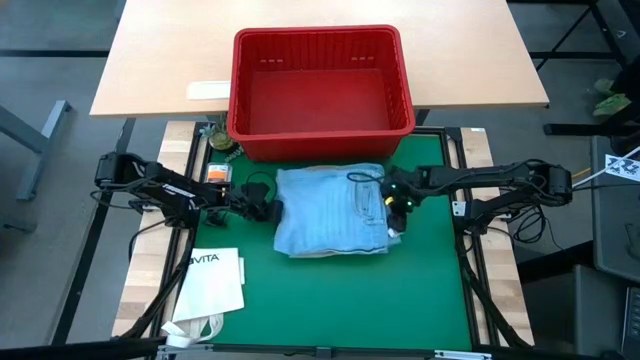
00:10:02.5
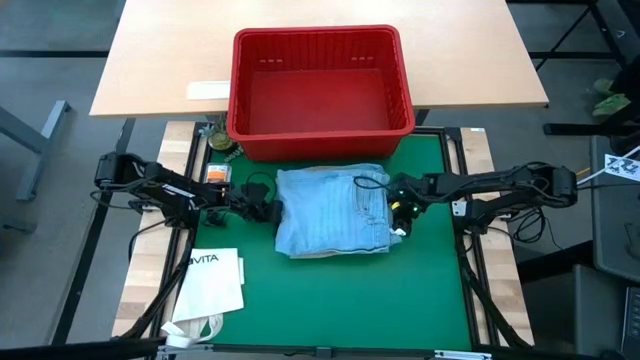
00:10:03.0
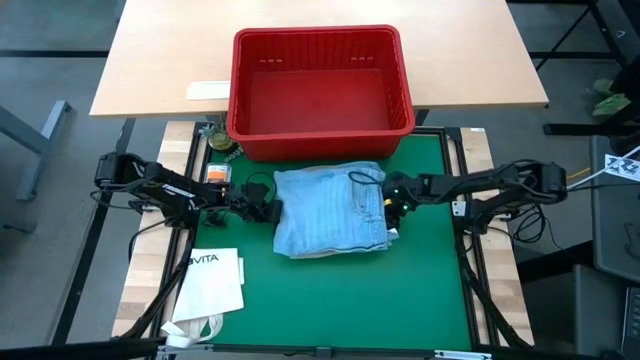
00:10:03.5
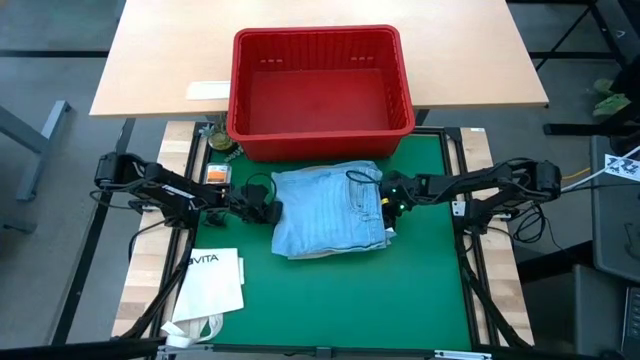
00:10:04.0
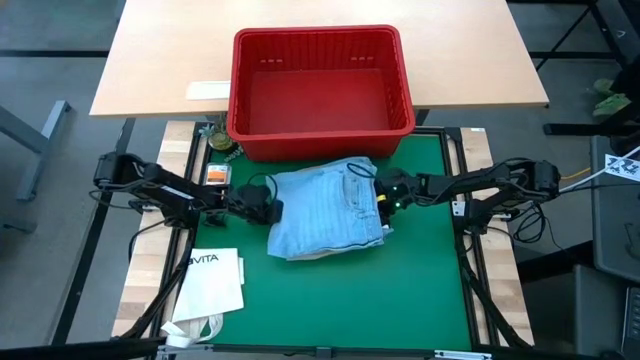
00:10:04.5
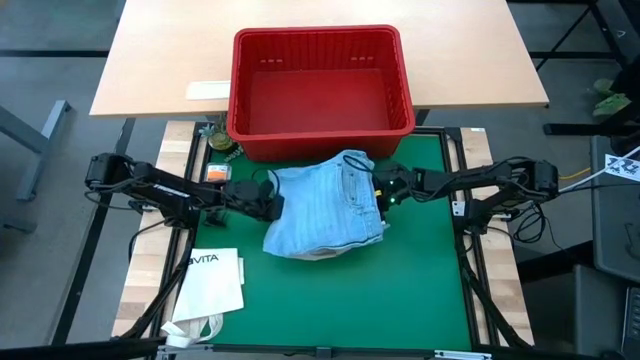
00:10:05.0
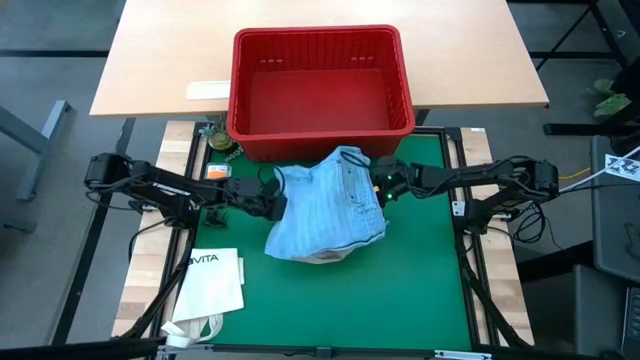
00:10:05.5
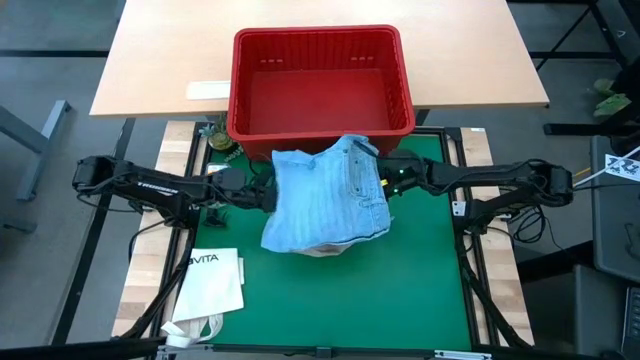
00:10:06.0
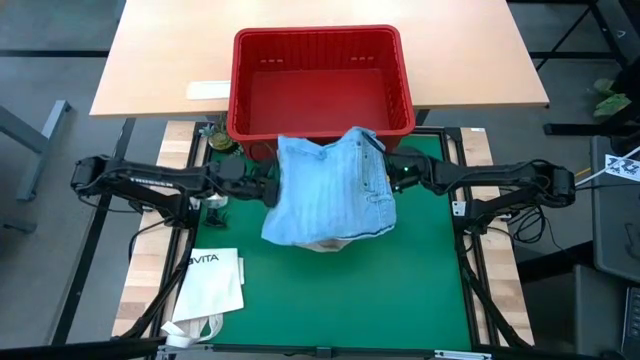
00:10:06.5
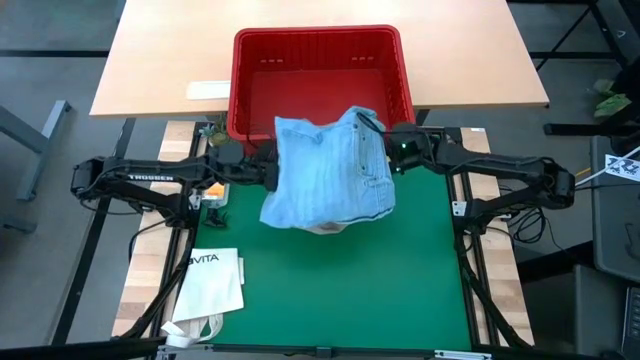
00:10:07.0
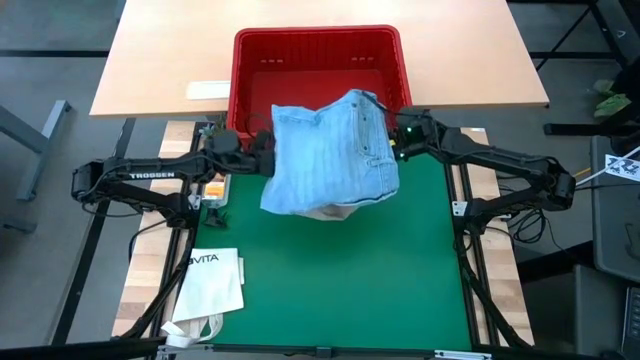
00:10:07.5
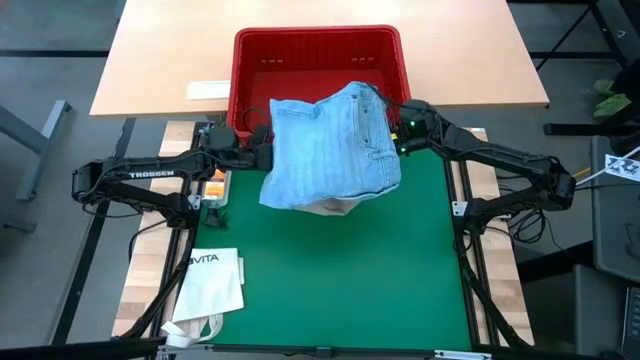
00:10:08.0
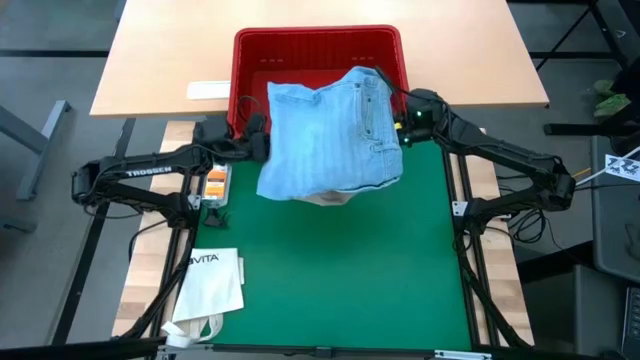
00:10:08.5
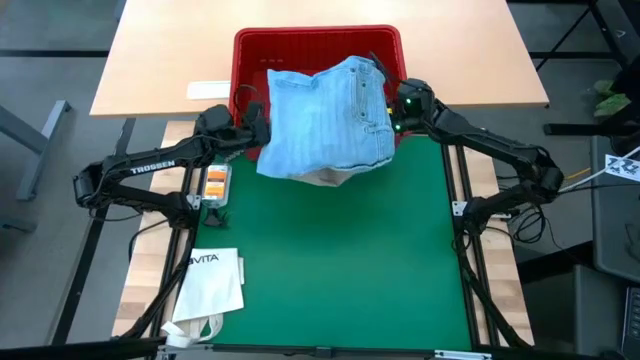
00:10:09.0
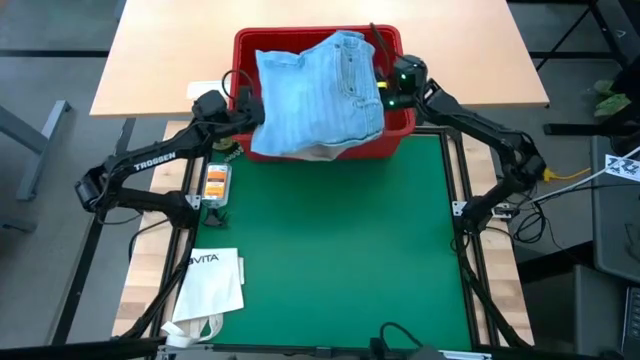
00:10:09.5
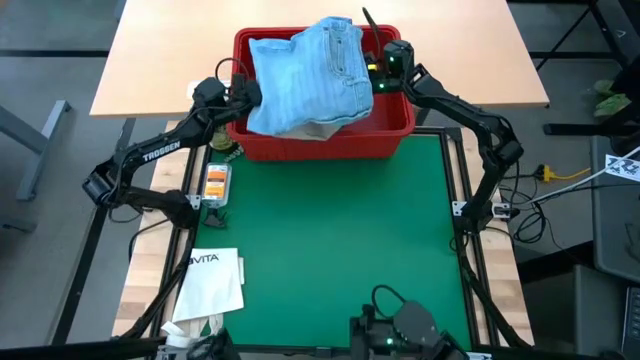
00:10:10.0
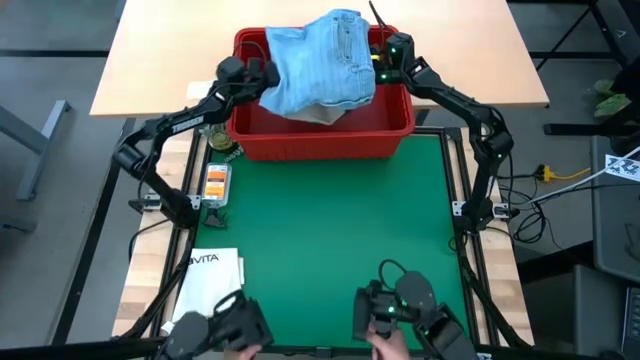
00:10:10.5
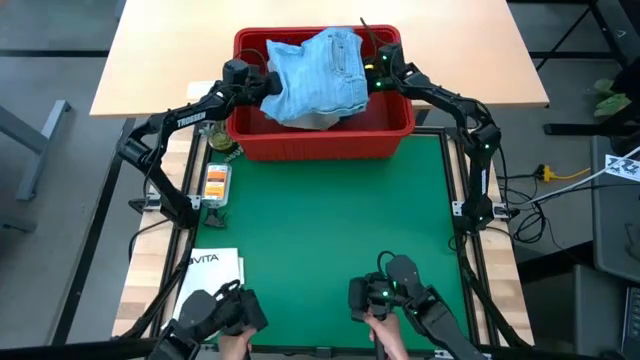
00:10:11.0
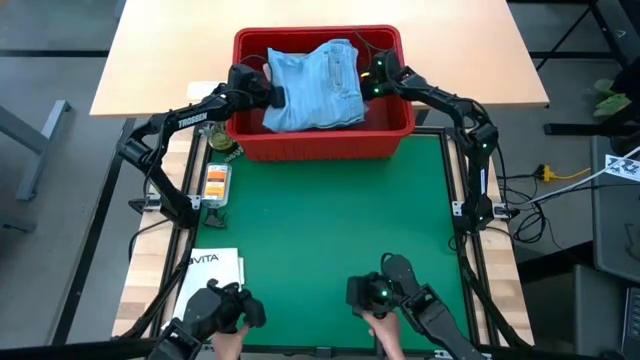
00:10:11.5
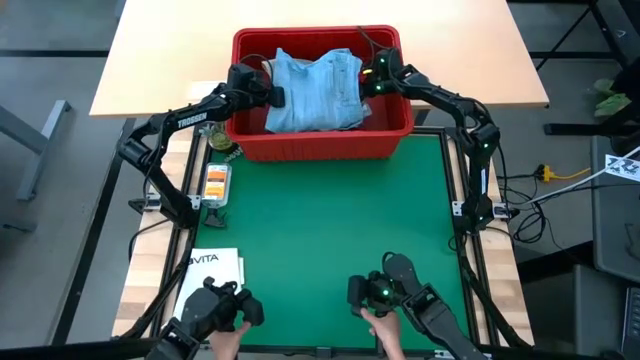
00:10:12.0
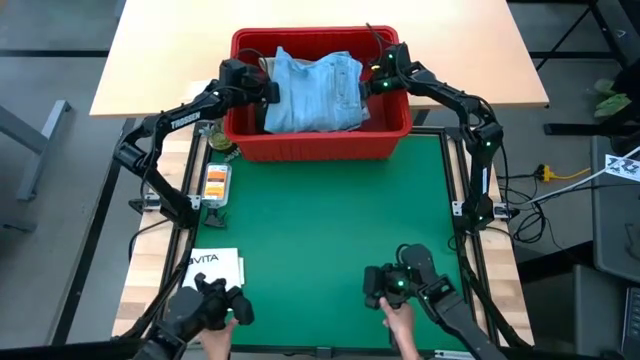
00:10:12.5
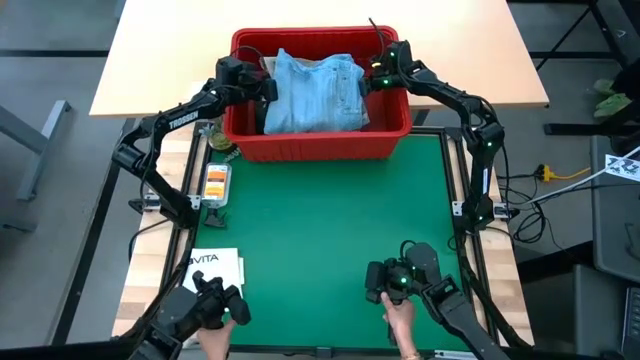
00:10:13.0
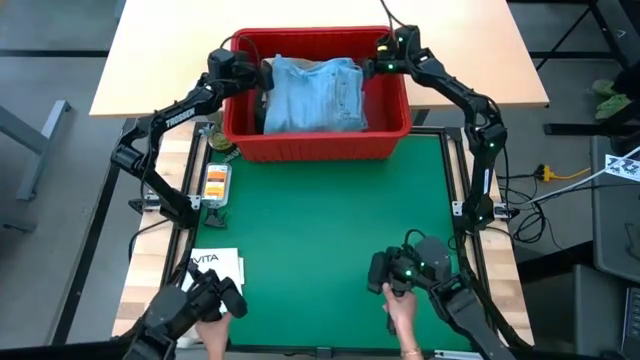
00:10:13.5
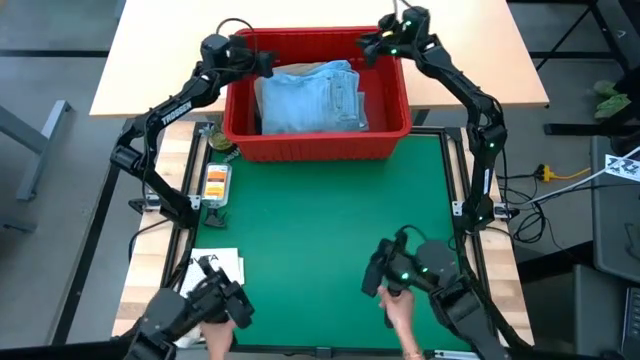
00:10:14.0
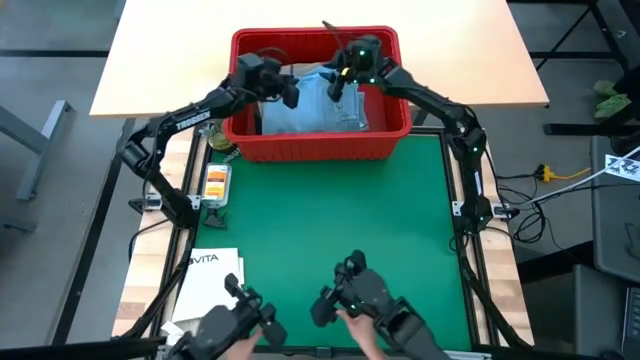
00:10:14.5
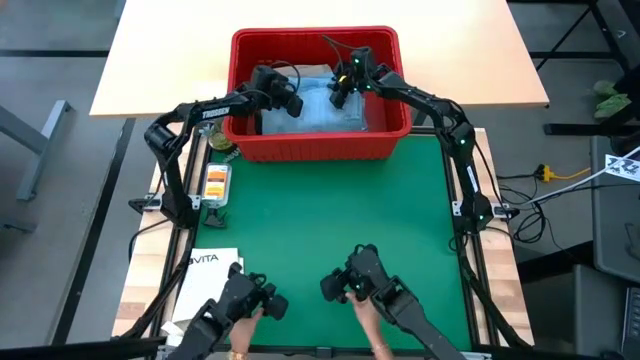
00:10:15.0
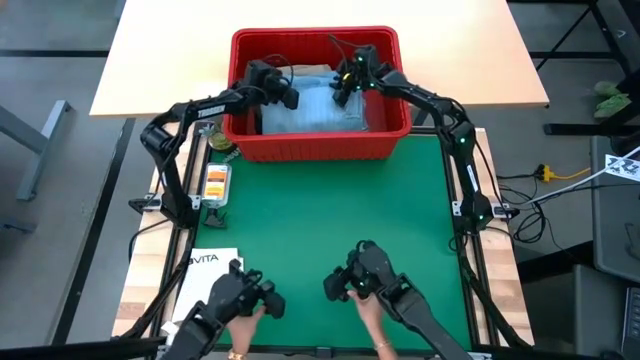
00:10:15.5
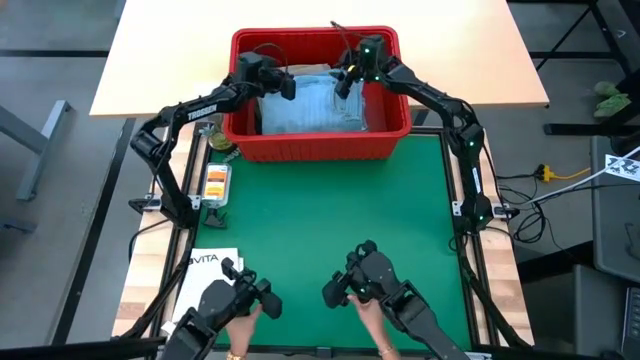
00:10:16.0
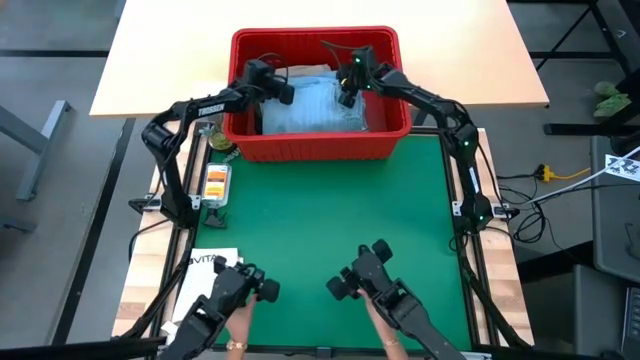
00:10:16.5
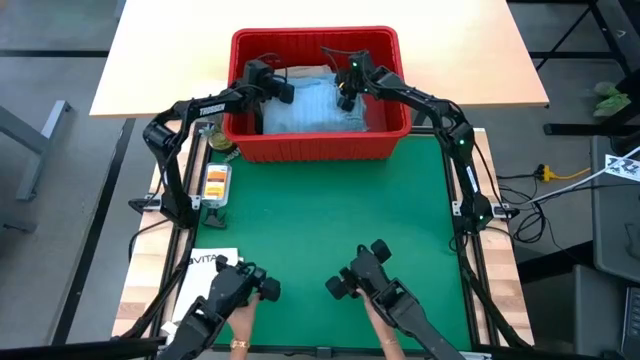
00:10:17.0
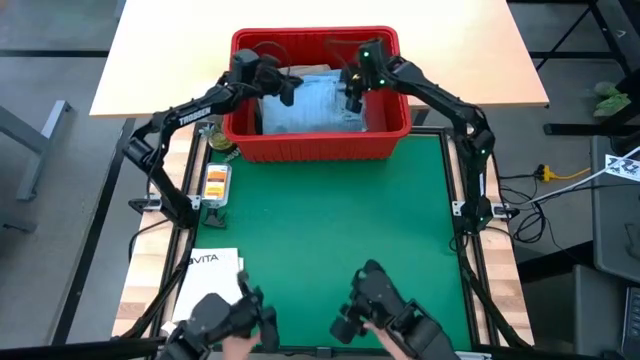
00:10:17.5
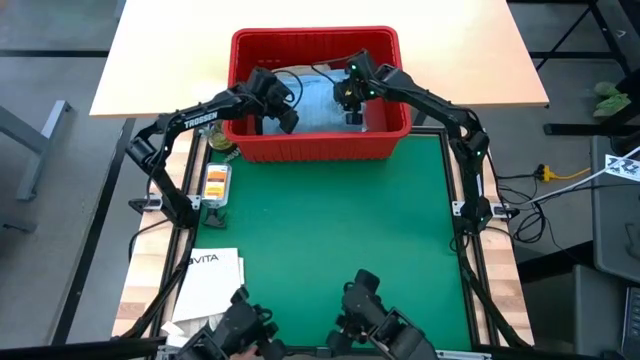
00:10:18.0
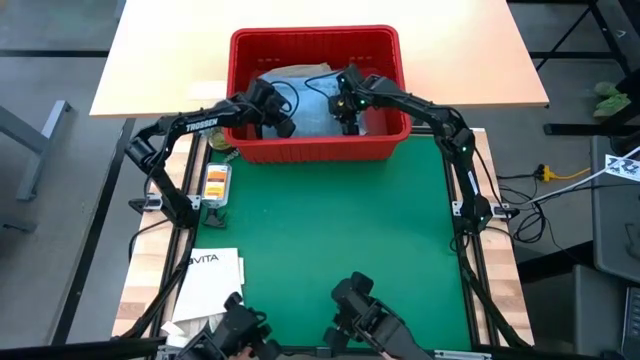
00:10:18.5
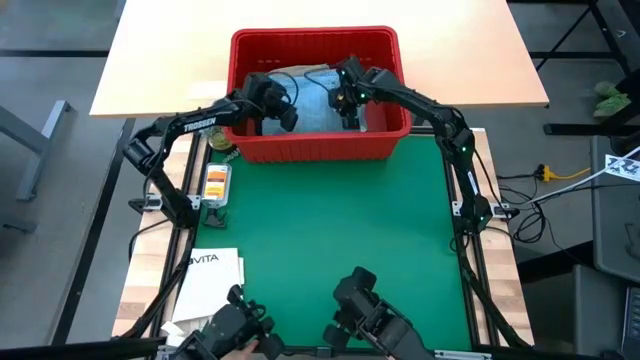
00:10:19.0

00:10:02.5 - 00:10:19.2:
Task: Fold Laundry from Bin
Put the stacked clothes into the red laundry bin

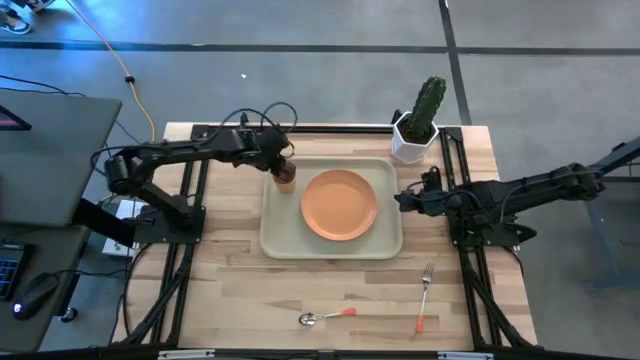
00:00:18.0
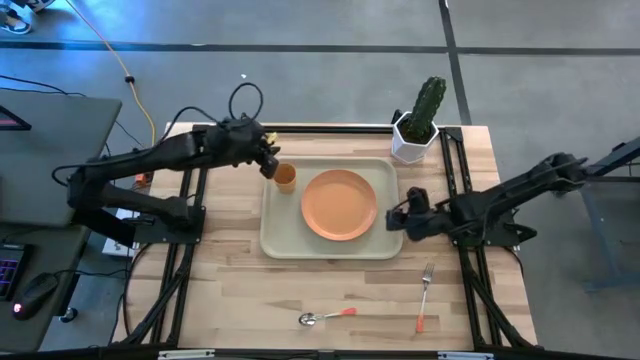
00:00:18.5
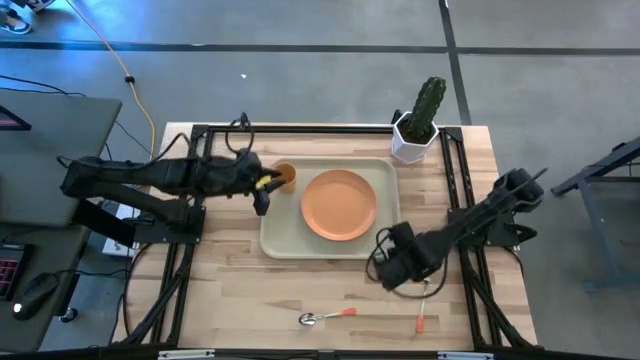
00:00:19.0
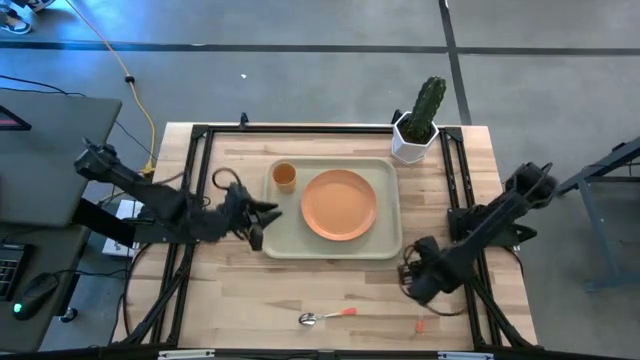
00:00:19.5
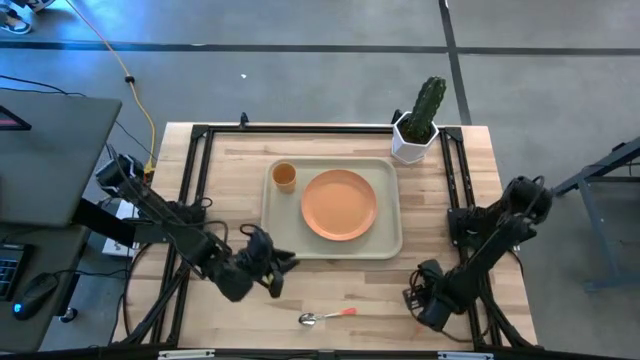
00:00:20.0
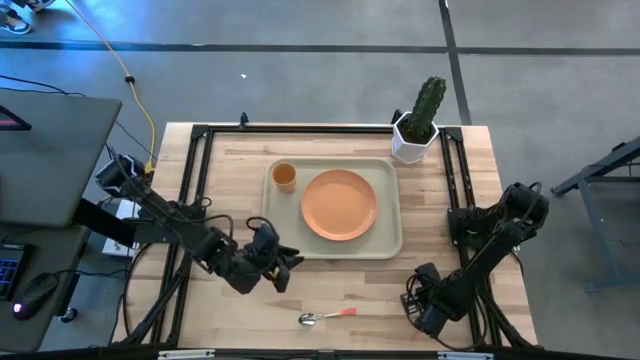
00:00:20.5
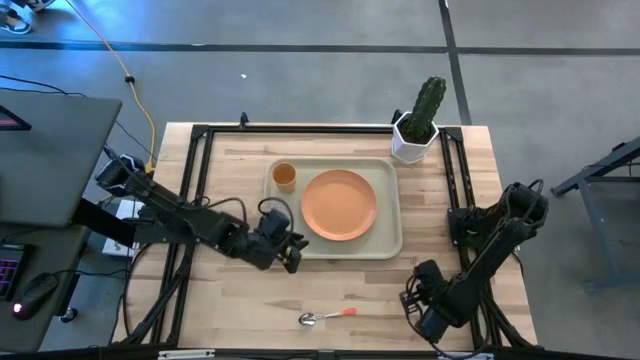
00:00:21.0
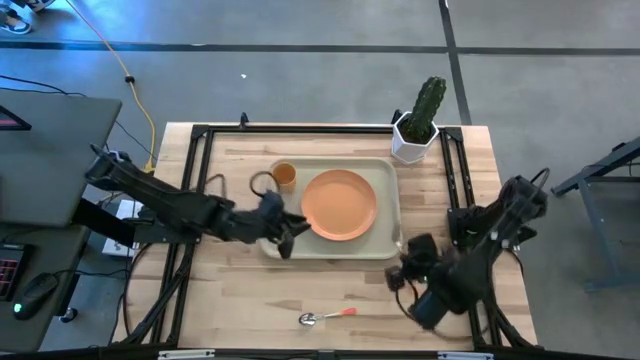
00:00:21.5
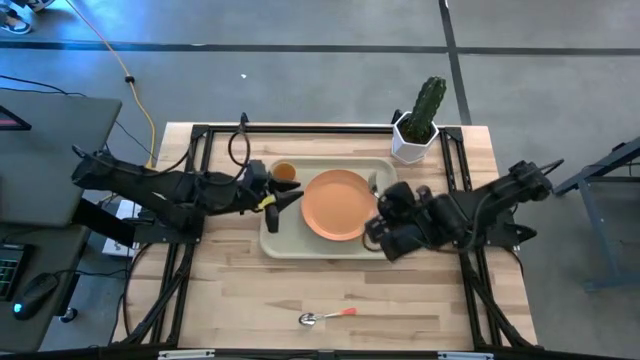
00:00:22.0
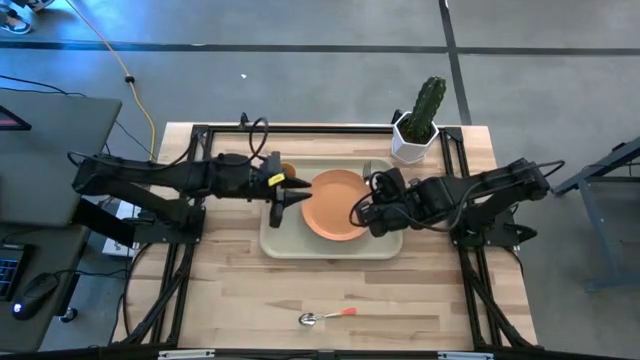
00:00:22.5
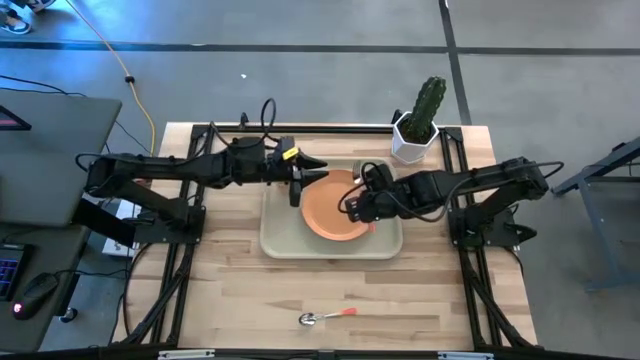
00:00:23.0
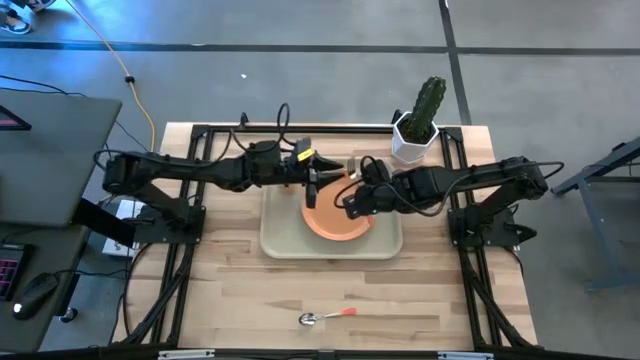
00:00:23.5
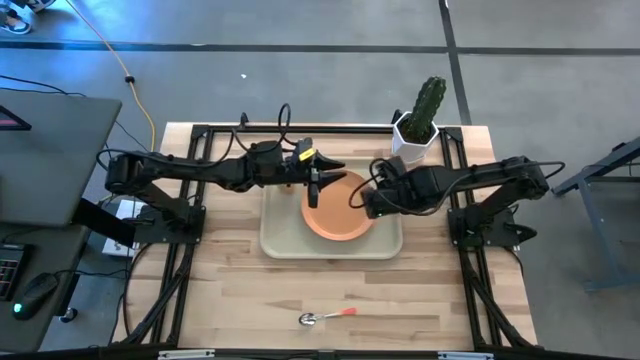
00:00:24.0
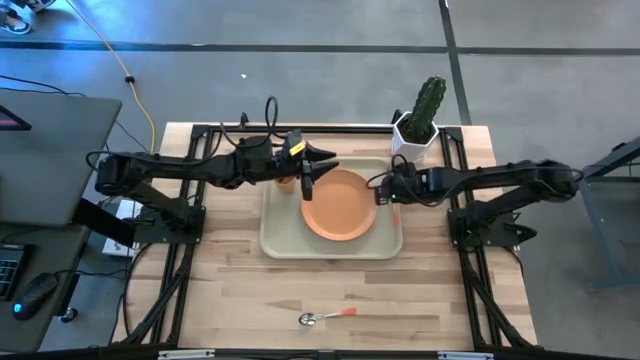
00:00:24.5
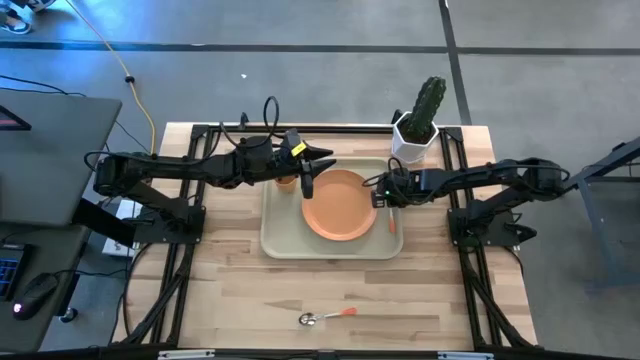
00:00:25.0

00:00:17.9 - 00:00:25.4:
Task: Pick and place plate/cup/fork/spoon on tray
Put the orange fork to the right side of the orange plate on the light brown tray
